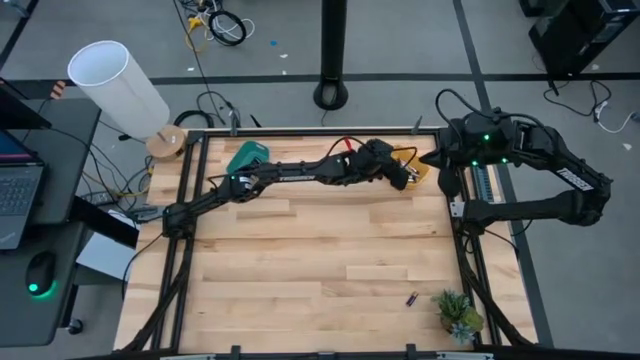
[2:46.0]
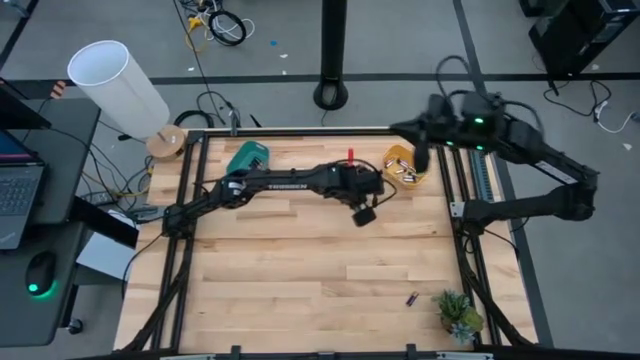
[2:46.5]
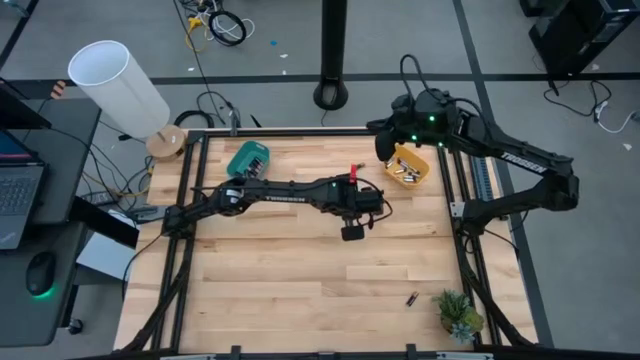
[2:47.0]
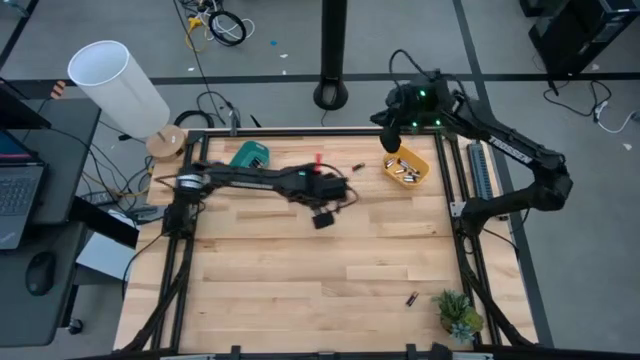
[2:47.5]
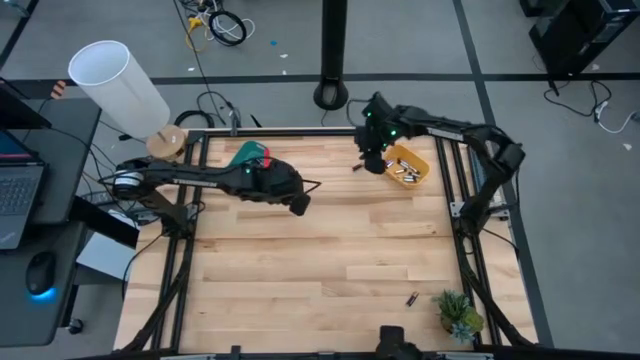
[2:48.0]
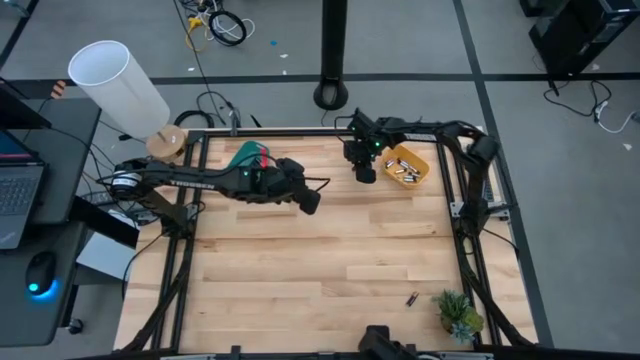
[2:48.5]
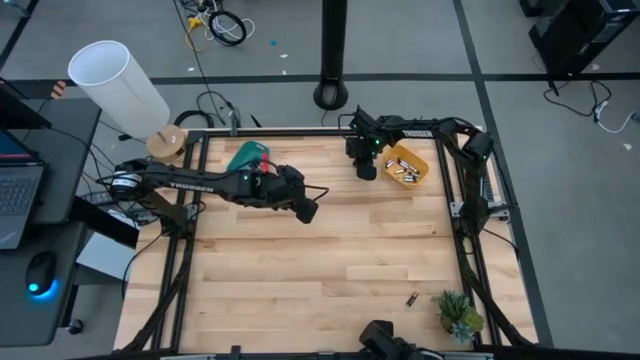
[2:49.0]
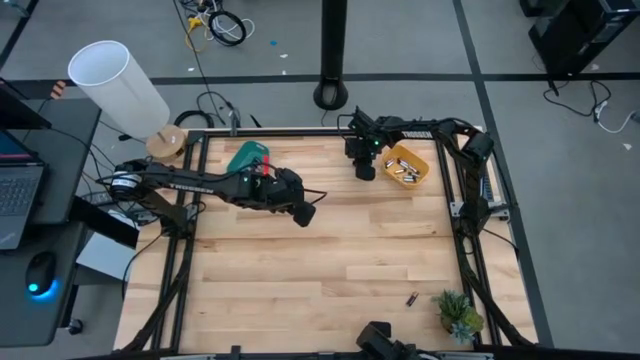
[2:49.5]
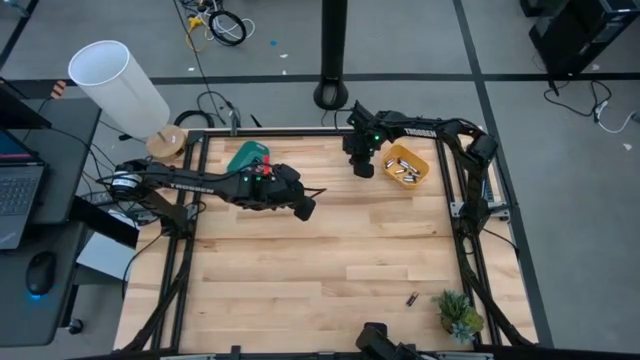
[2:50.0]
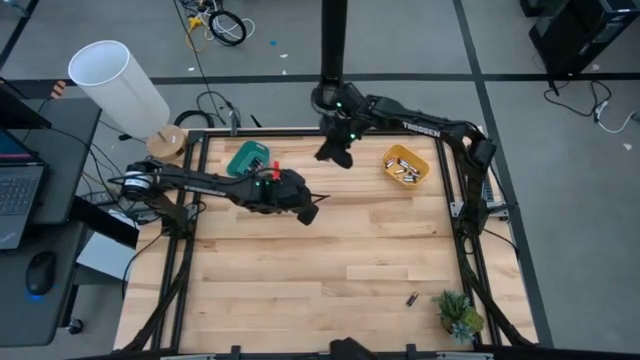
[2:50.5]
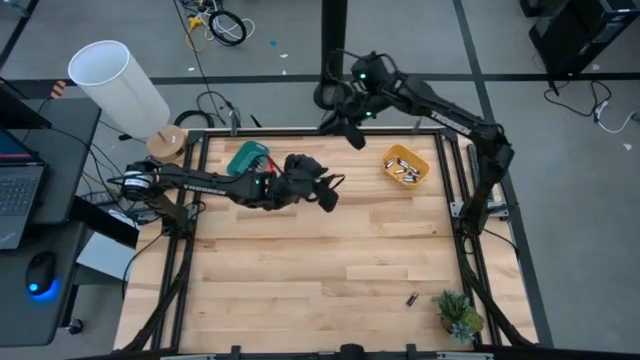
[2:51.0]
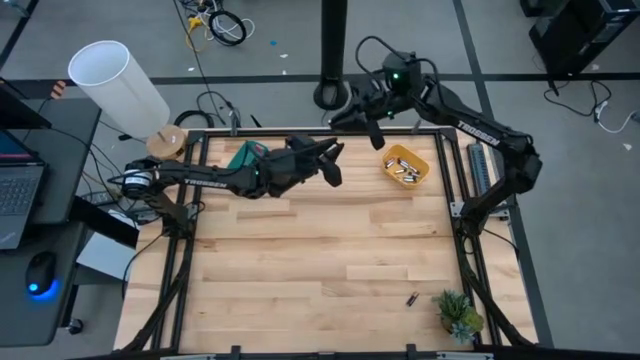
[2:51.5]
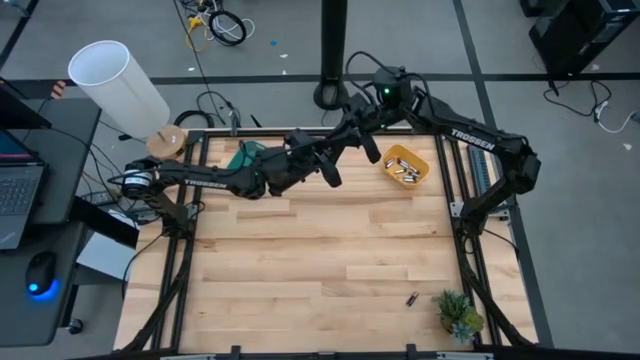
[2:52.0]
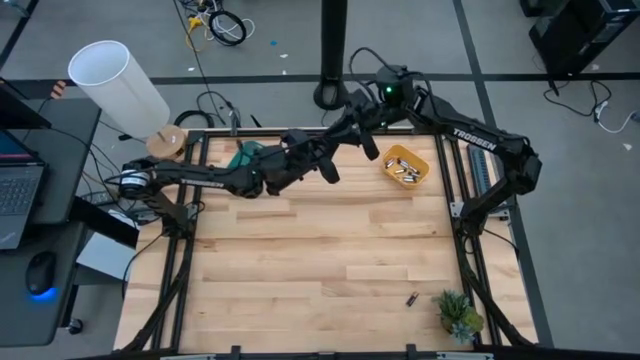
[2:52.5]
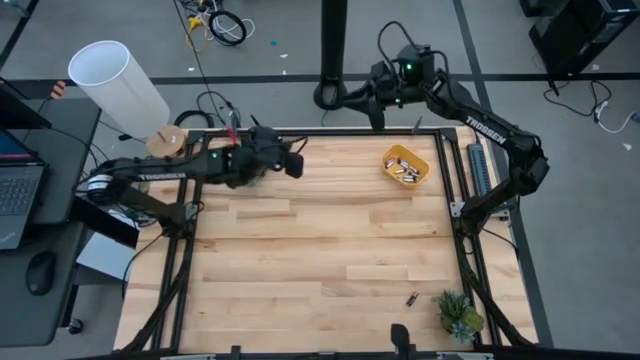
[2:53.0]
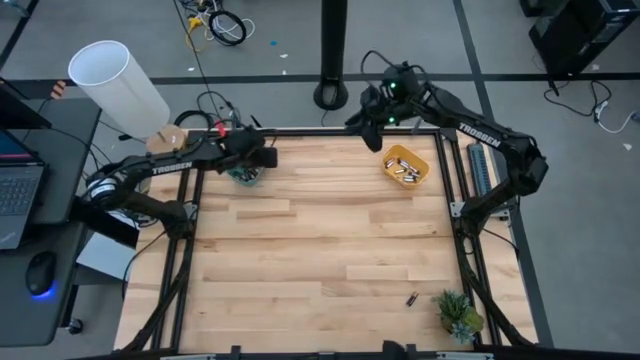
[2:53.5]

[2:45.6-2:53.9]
Task: Sort batteries
Put the black battery into the blue bin

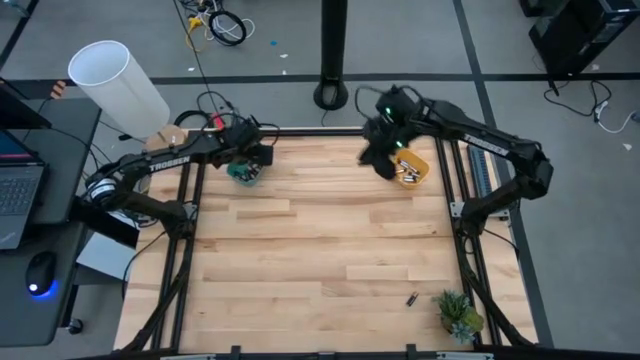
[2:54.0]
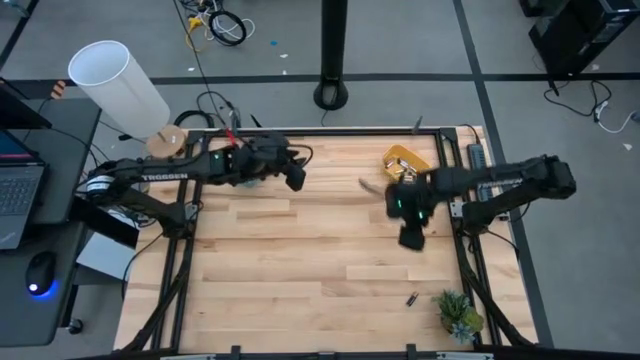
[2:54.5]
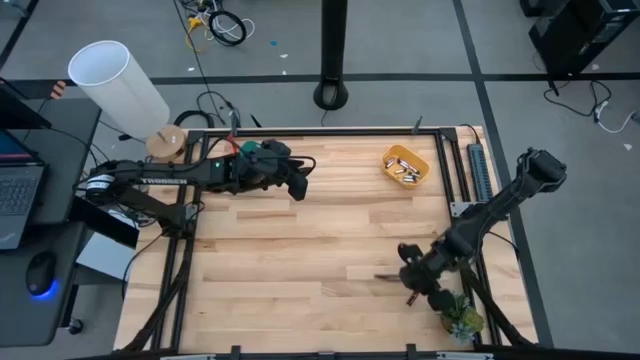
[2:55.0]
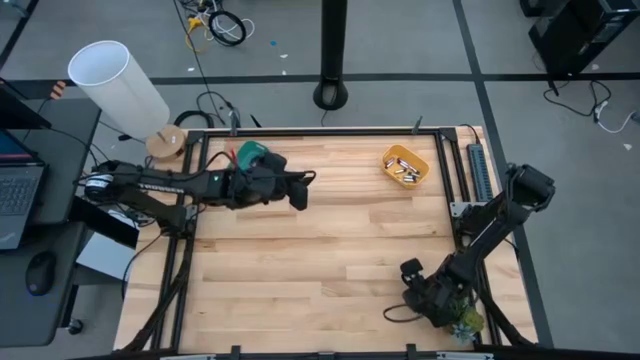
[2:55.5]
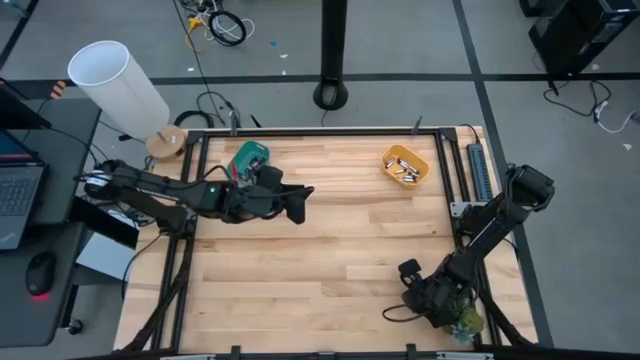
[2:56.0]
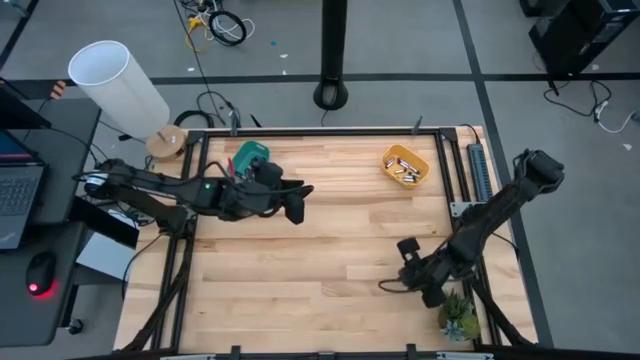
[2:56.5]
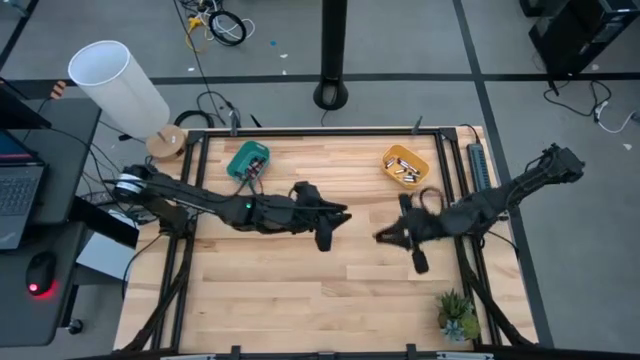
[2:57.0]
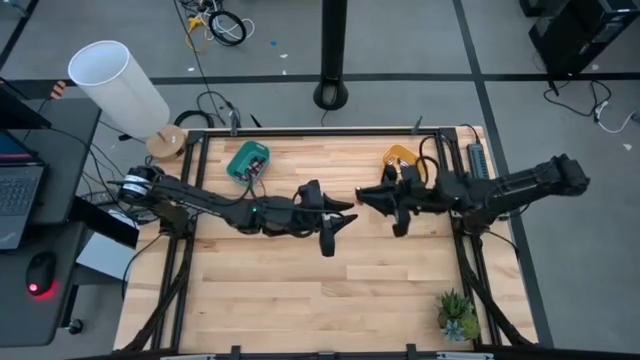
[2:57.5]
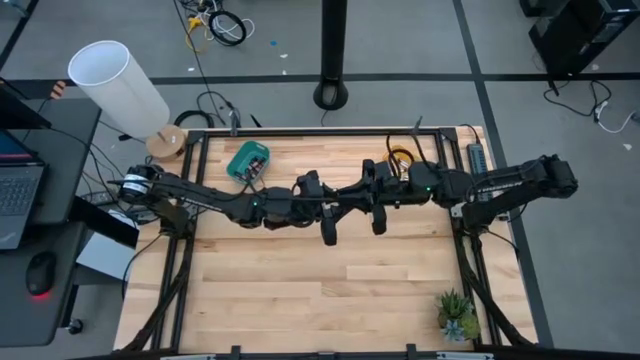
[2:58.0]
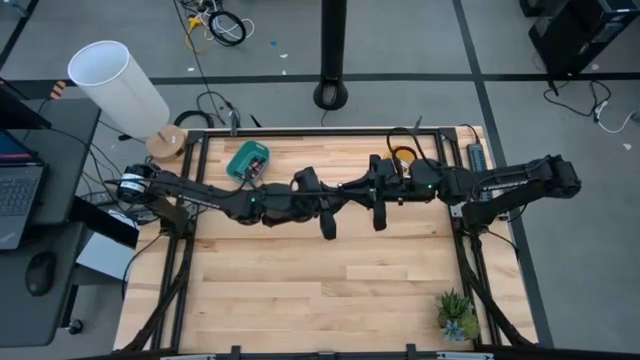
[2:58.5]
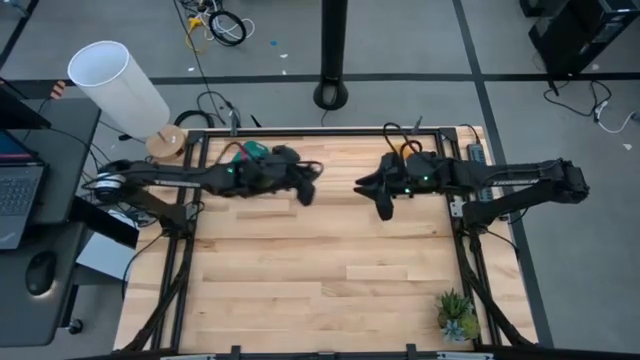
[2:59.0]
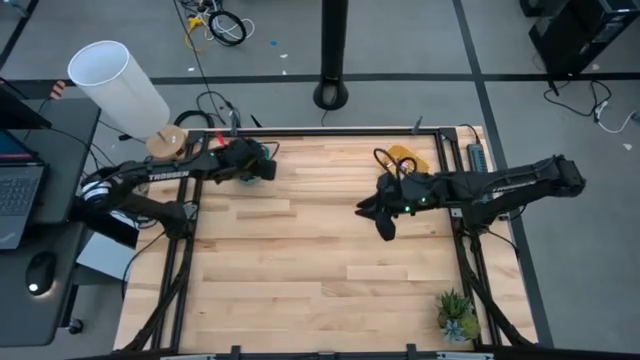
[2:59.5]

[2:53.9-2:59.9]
Put the black battery into the blue bin

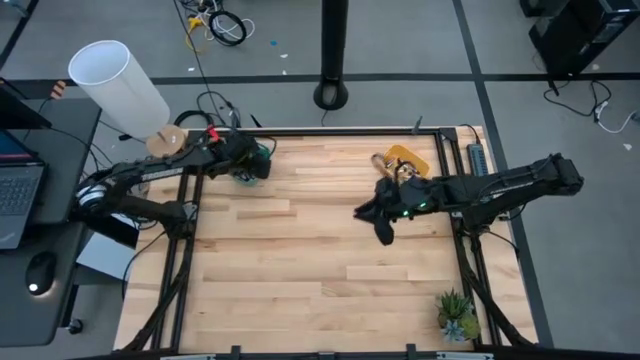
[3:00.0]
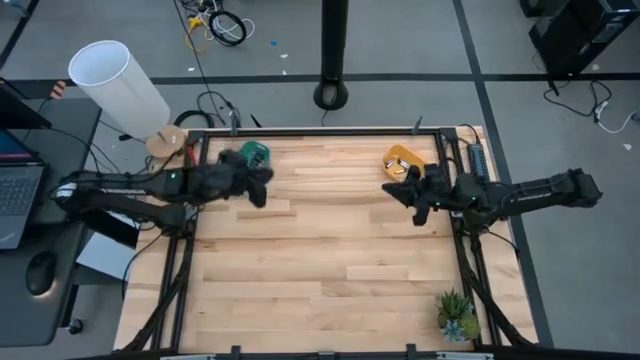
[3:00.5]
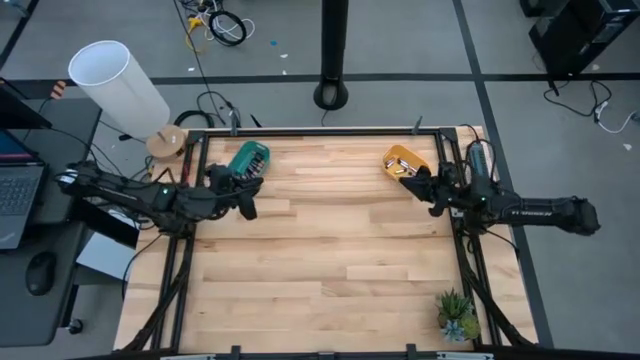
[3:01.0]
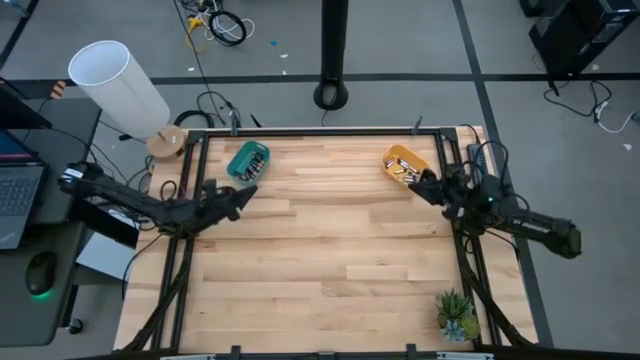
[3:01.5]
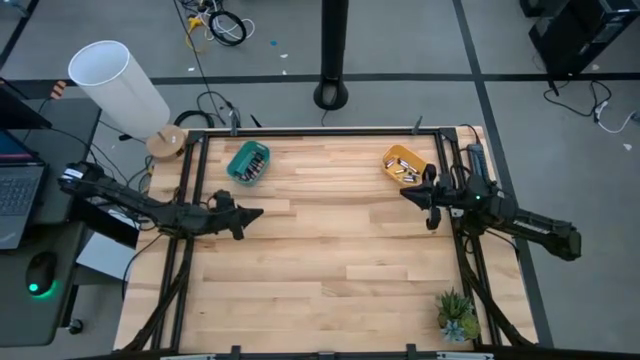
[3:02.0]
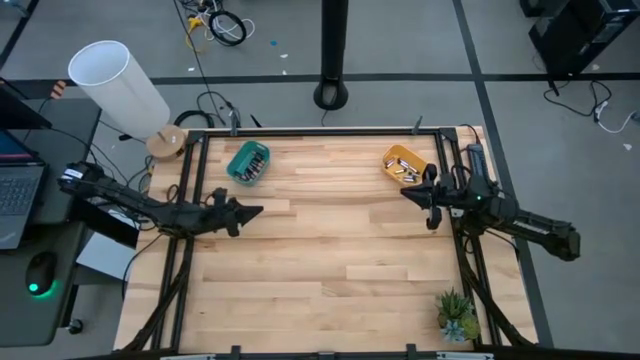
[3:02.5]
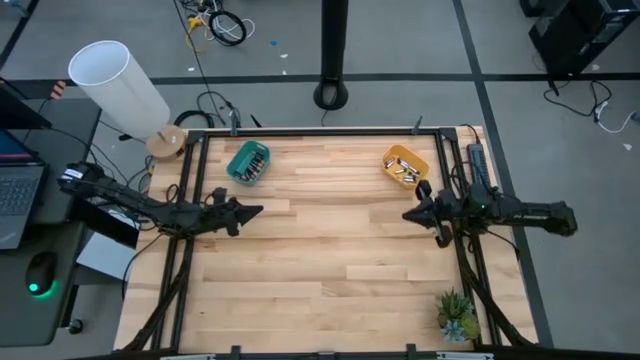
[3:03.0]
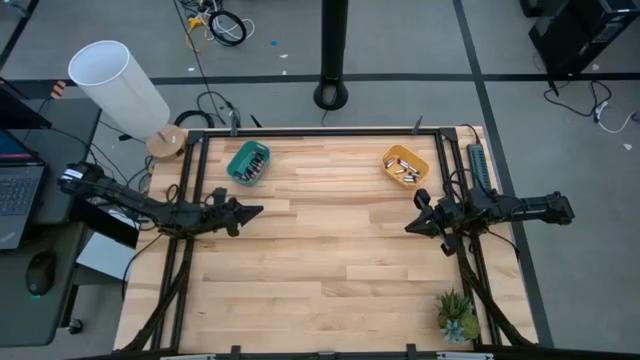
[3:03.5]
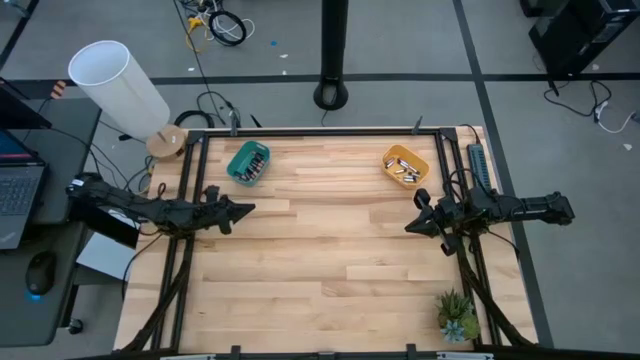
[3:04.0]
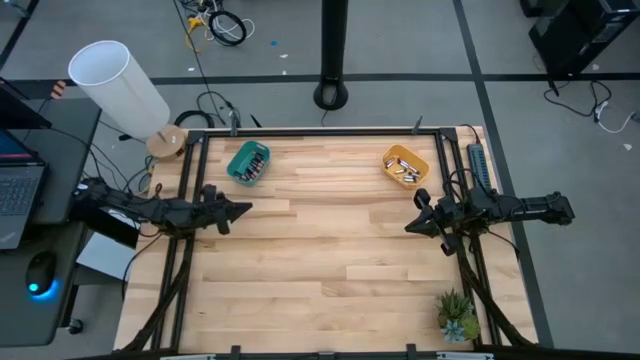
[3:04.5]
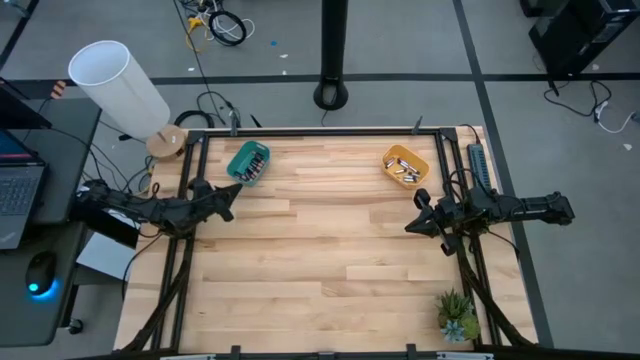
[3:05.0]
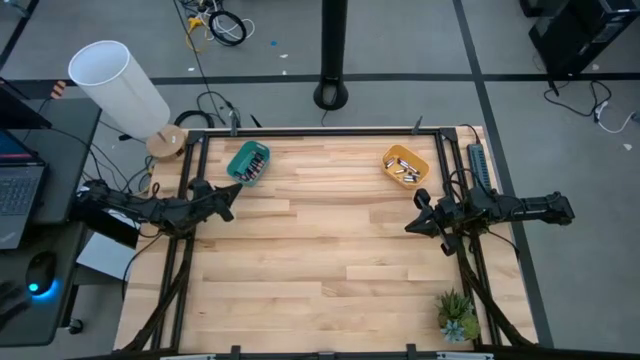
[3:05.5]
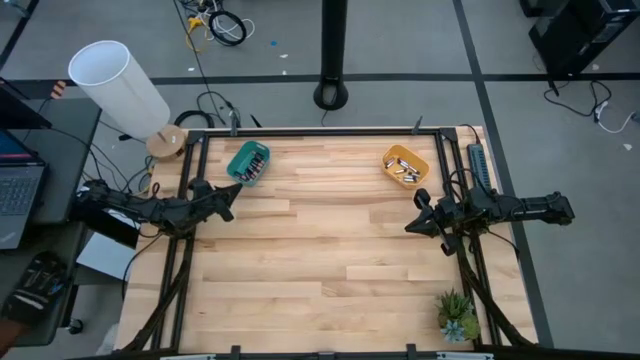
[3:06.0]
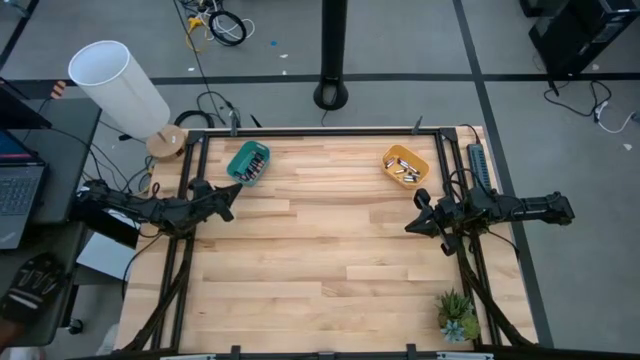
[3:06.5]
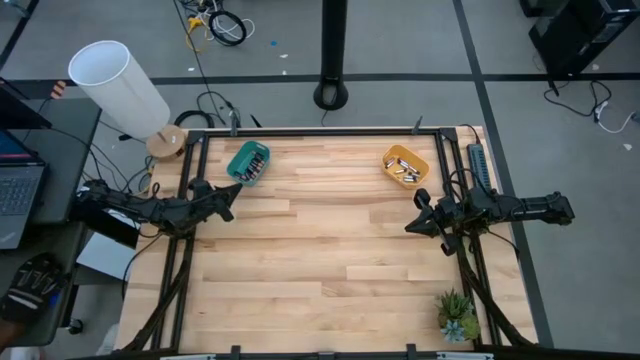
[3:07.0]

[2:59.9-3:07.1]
Return to Home Position
